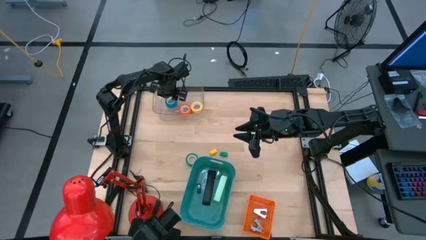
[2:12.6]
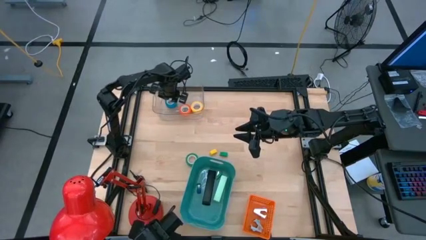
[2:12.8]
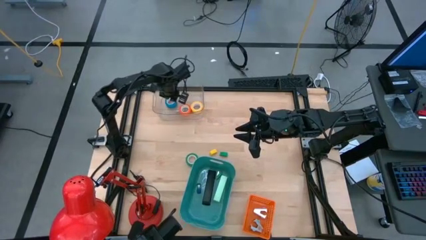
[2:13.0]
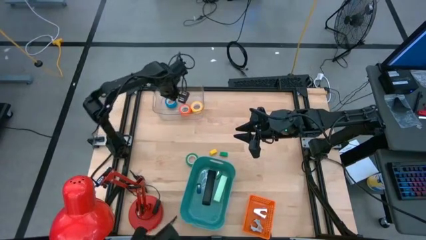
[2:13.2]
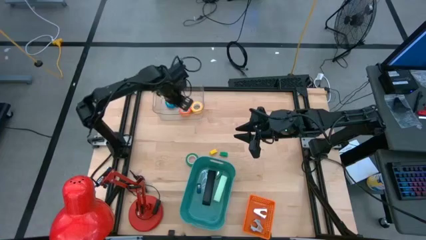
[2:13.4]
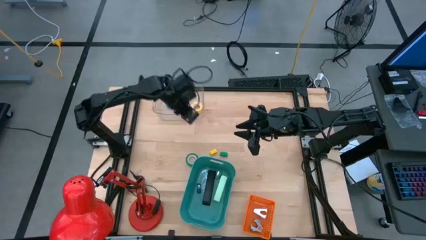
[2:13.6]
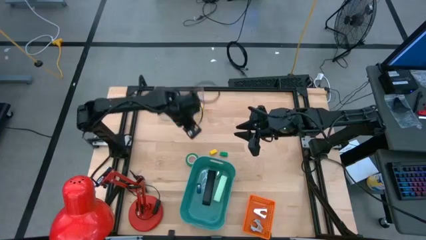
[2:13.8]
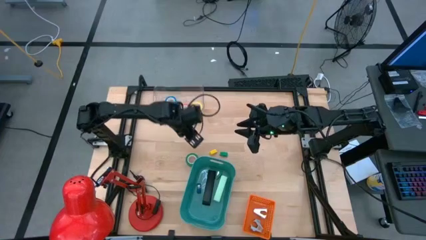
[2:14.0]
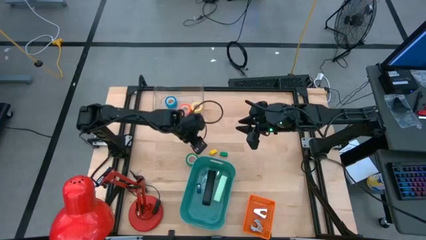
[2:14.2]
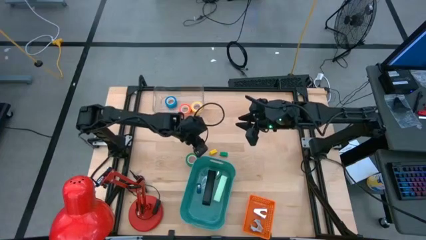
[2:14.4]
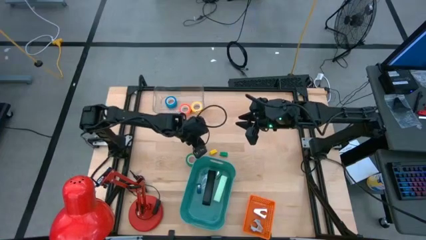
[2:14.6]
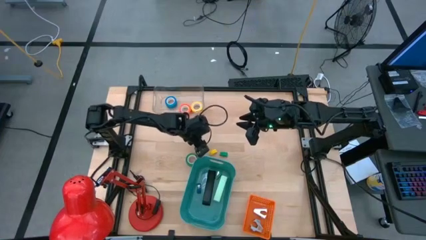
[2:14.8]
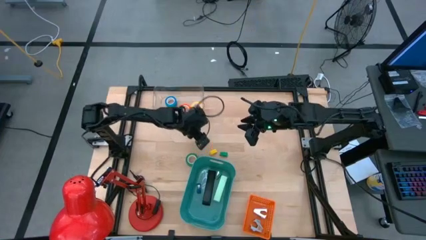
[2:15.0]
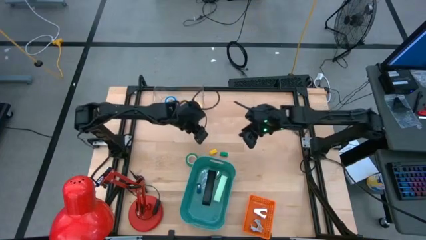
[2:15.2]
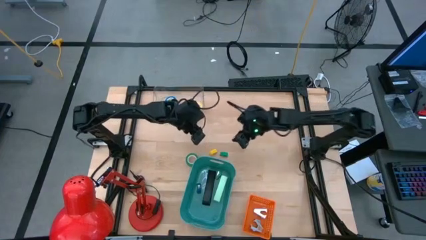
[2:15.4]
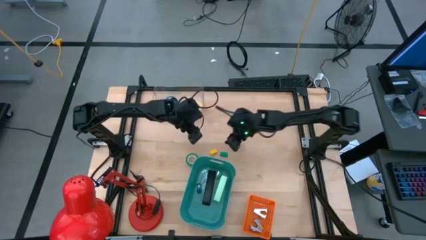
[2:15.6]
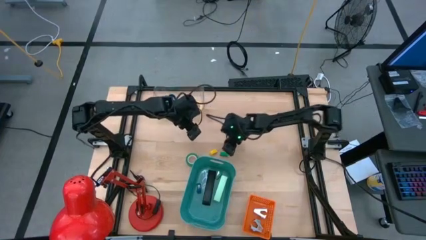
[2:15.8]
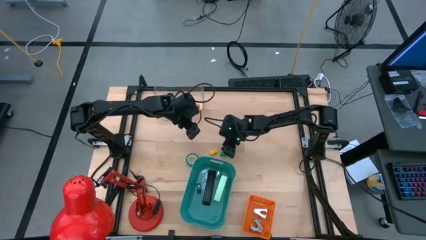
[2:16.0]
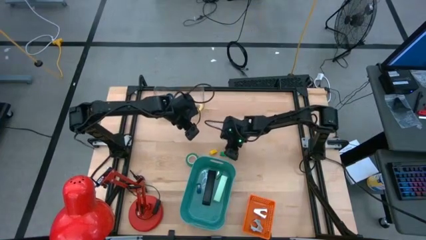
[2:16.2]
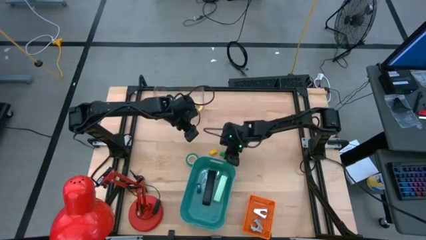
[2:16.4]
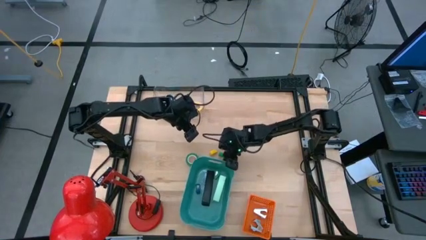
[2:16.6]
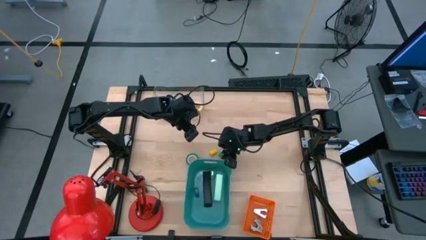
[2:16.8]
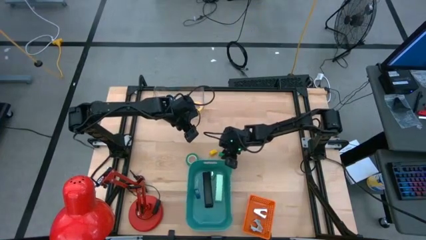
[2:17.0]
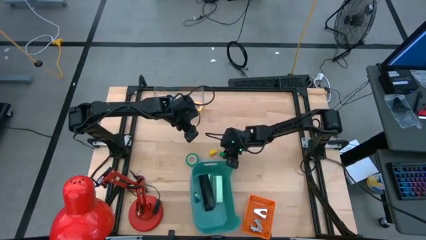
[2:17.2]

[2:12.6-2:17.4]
Task: Pick and place Stapler, Stapler remover, tape
Put the green stapler into the green bin

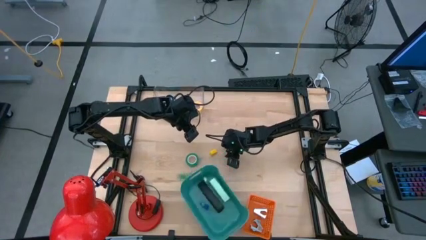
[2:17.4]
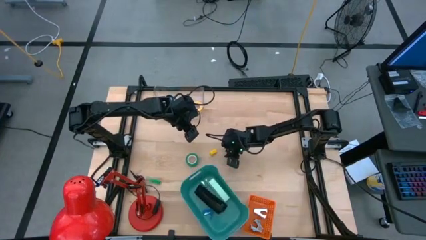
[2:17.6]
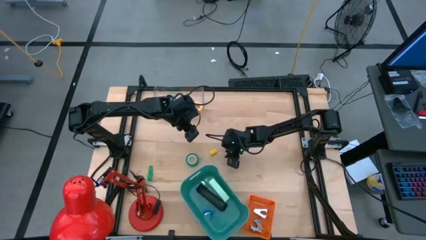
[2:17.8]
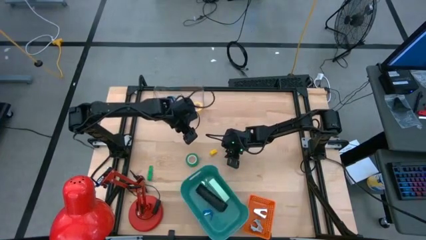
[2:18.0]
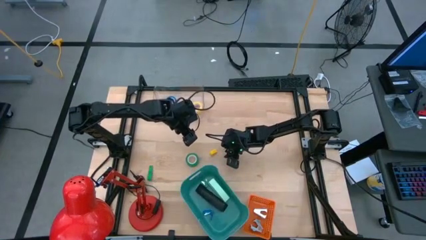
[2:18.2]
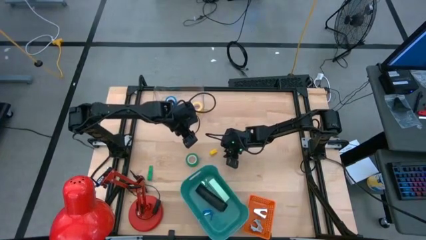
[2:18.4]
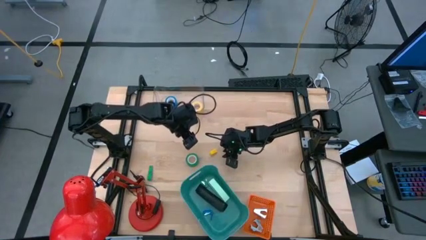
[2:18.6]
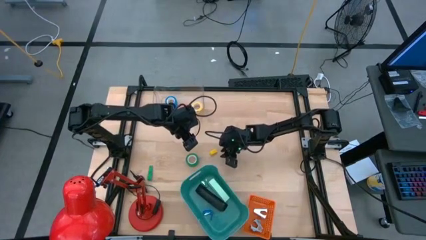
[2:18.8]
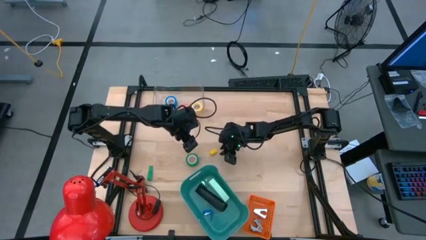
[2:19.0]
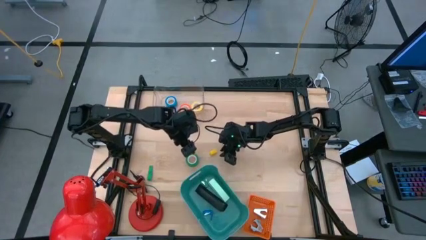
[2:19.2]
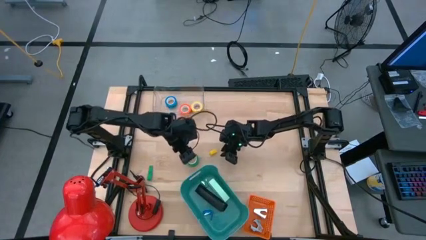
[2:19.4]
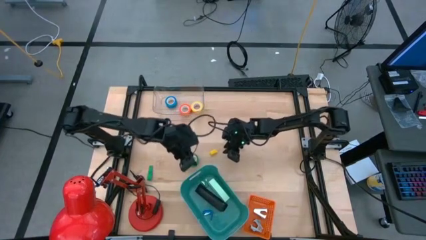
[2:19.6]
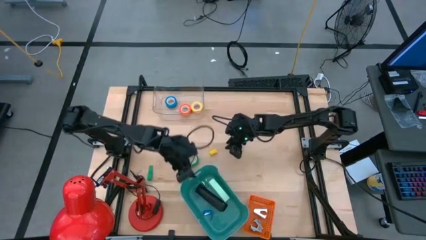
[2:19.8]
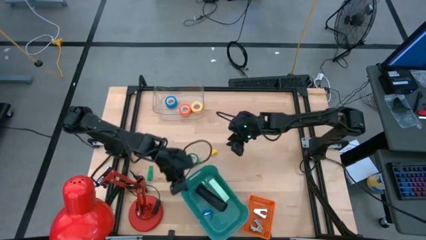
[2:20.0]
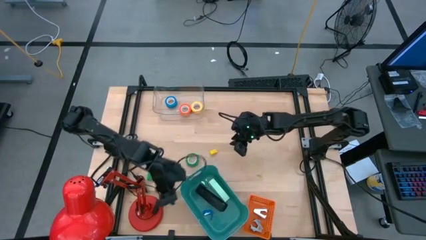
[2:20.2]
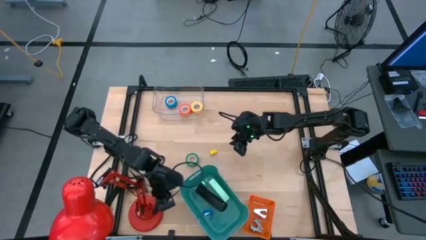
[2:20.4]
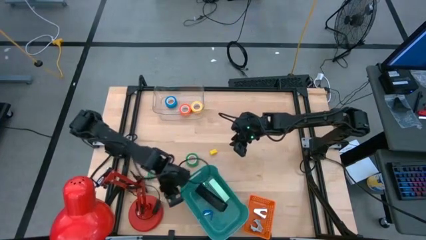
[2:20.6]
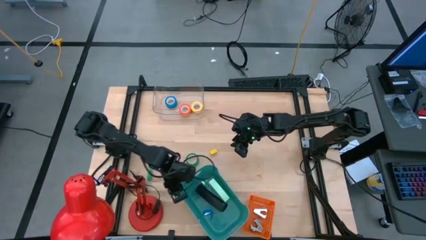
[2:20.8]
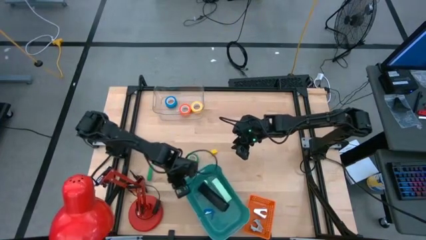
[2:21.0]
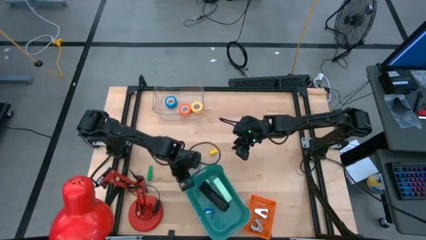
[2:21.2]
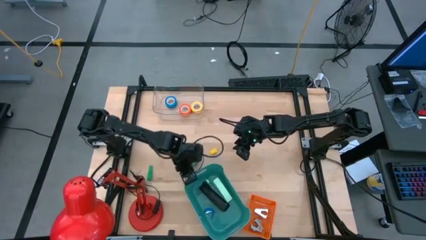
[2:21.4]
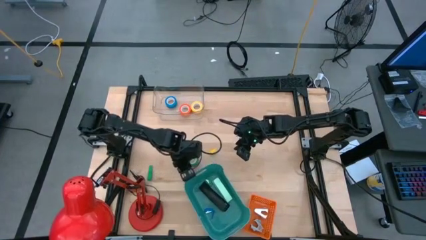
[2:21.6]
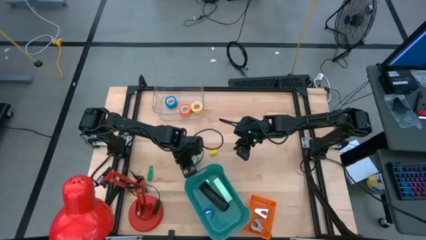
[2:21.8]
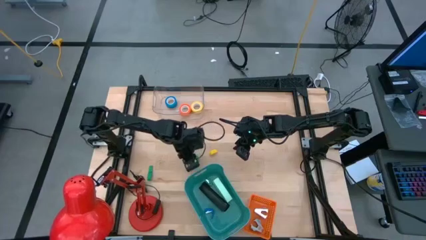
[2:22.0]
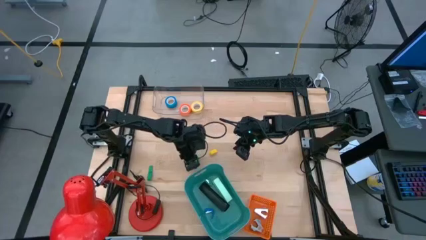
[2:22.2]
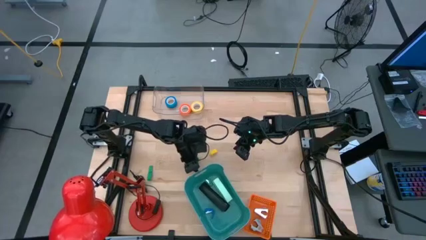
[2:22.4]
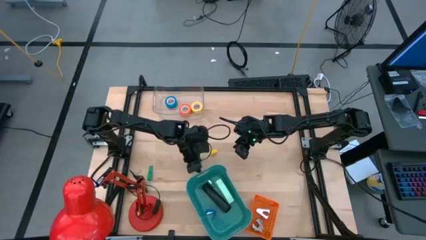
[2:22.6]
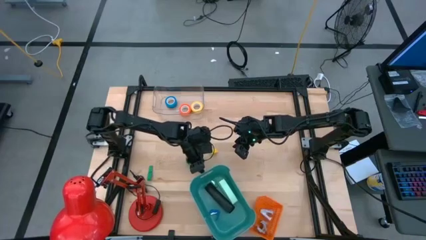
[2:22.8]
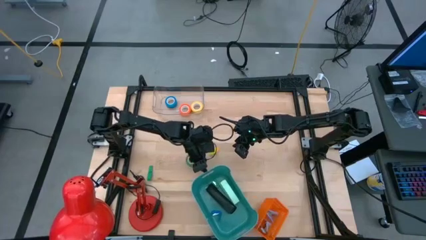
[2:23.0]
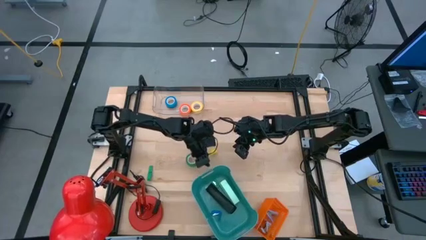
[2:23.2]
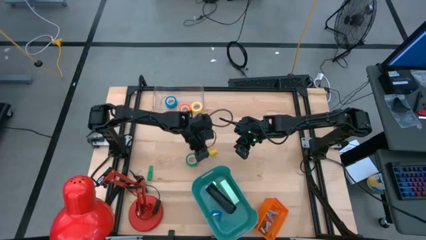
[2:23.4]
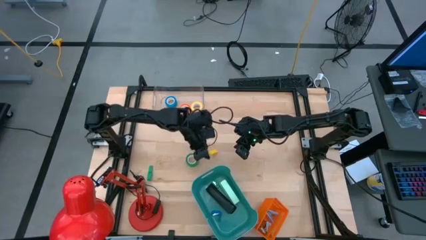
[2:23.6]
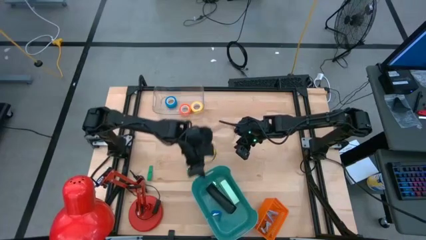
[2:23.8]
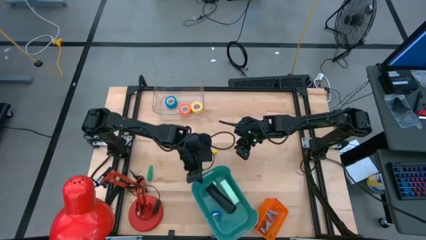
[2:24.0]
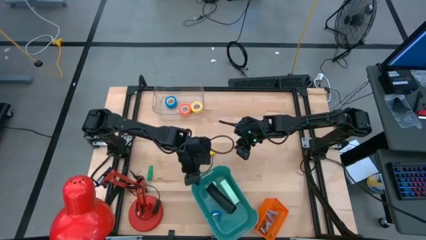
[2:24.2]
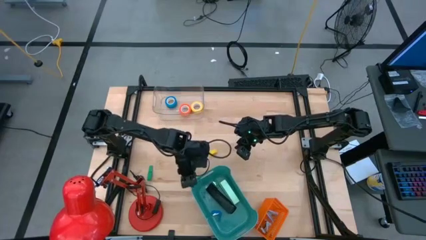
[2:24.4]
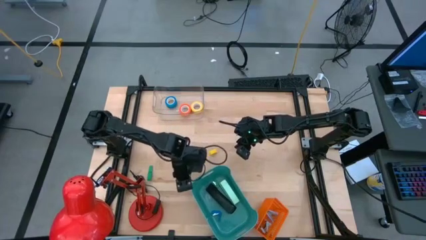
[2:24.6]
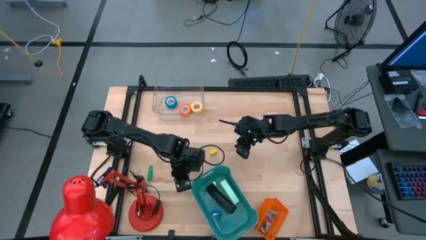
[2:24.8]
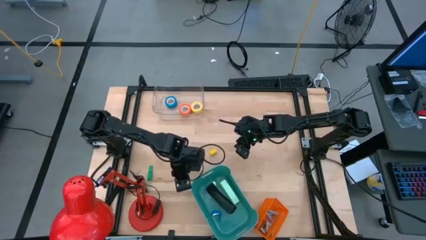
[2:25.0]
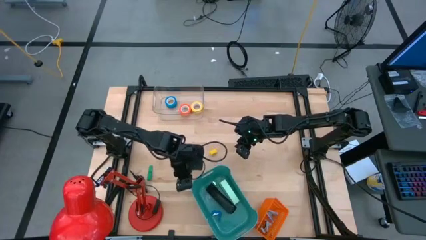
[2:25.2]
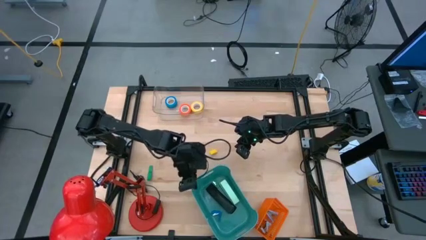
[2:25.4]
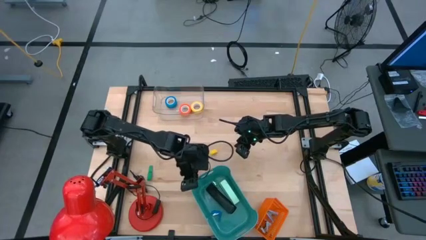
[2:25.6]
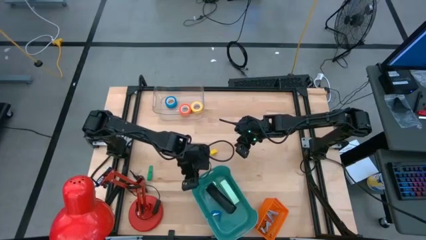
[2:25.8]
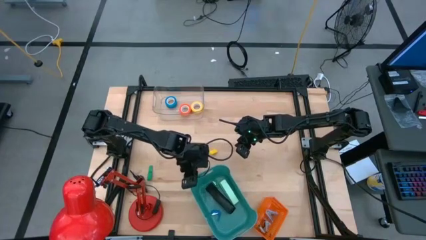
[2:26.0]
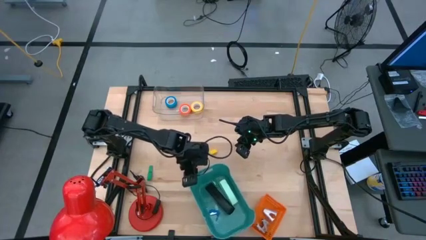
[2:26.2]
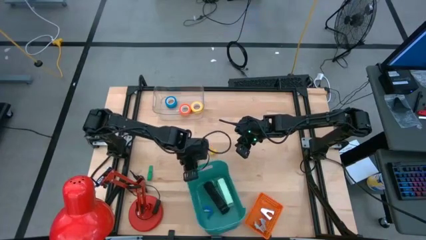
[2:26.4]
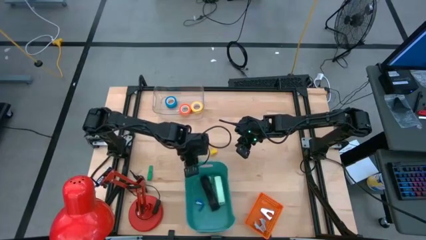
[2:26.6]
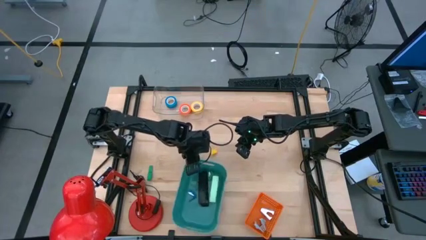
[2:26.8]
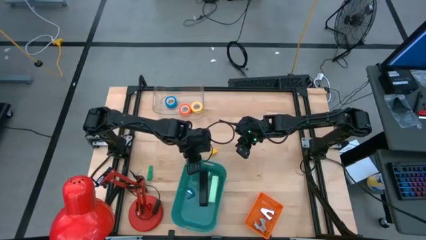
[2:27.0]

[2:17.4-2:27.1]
Adjust the green bin
